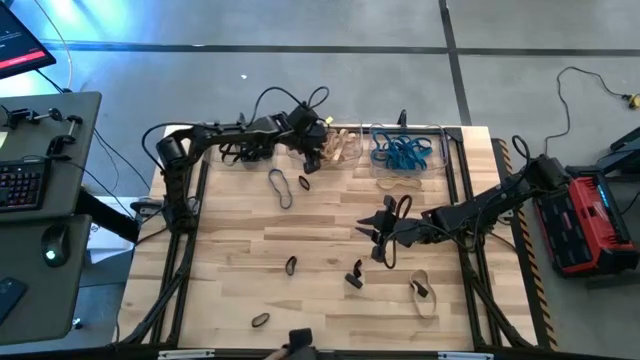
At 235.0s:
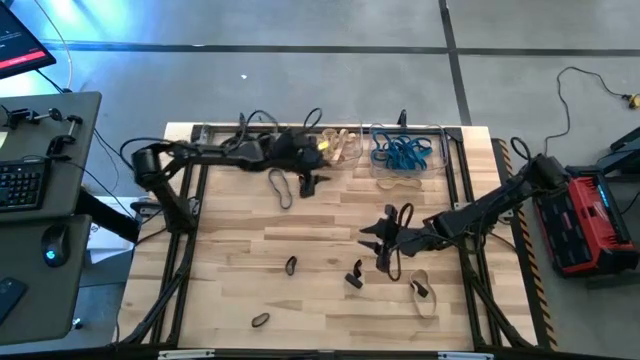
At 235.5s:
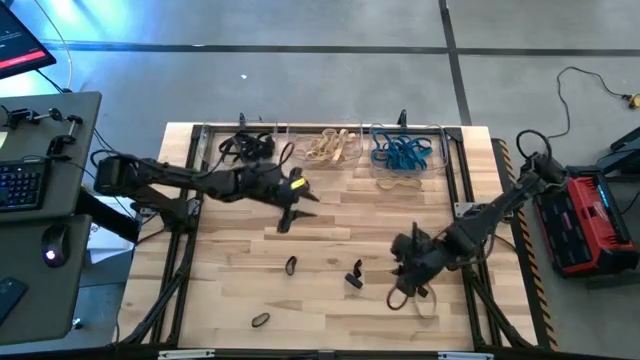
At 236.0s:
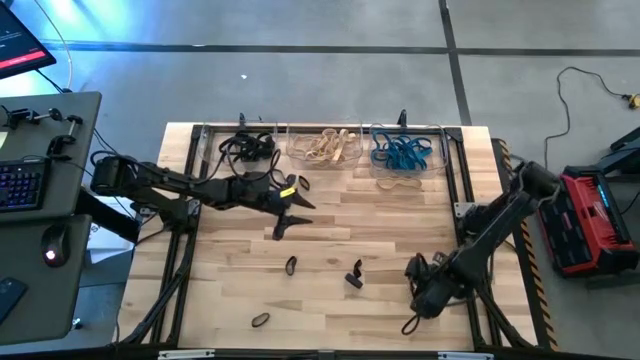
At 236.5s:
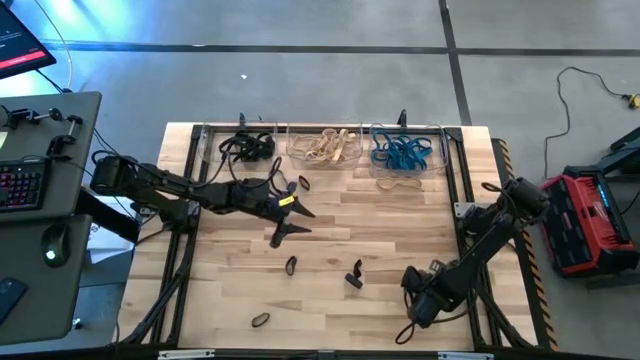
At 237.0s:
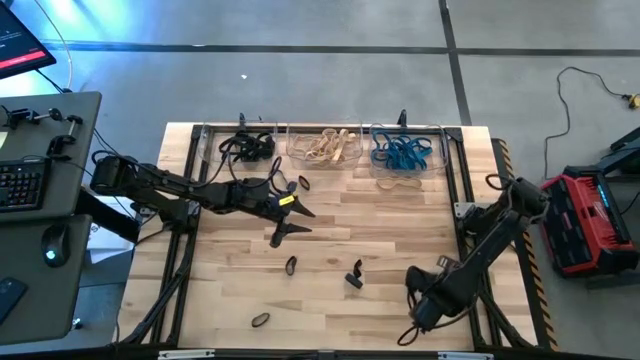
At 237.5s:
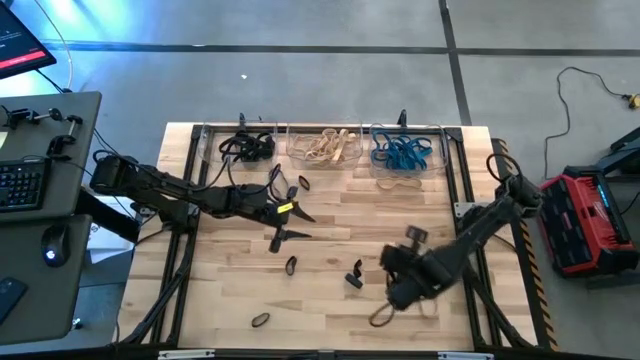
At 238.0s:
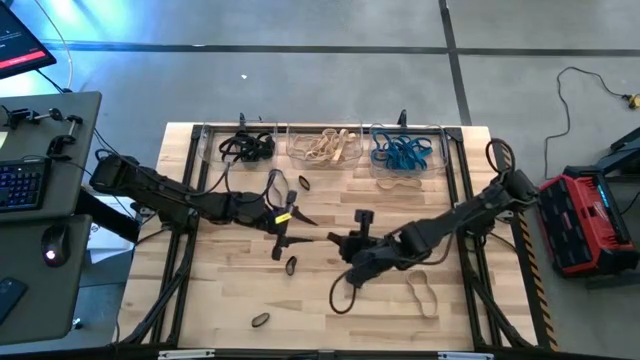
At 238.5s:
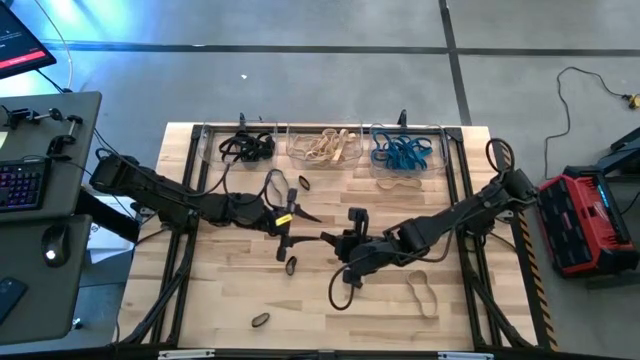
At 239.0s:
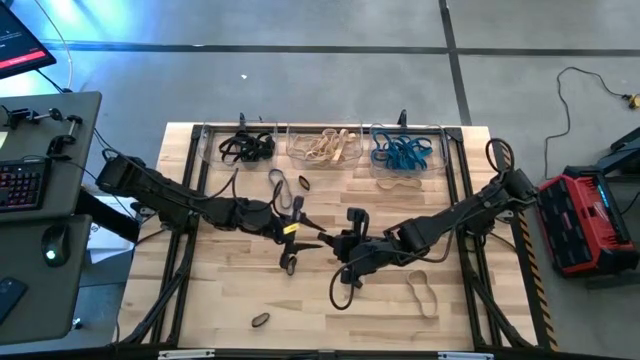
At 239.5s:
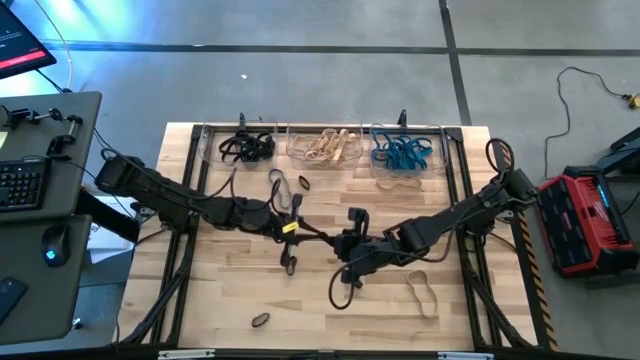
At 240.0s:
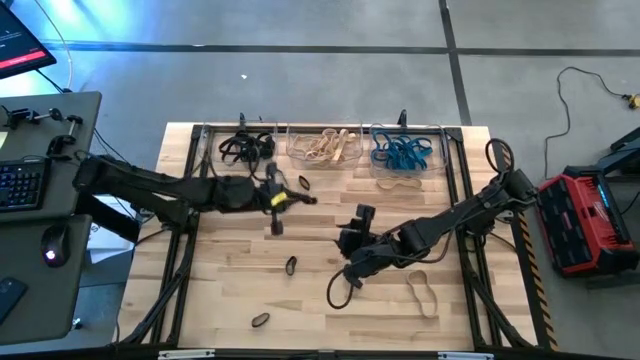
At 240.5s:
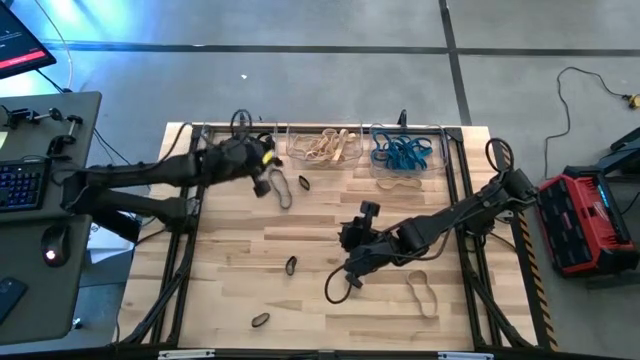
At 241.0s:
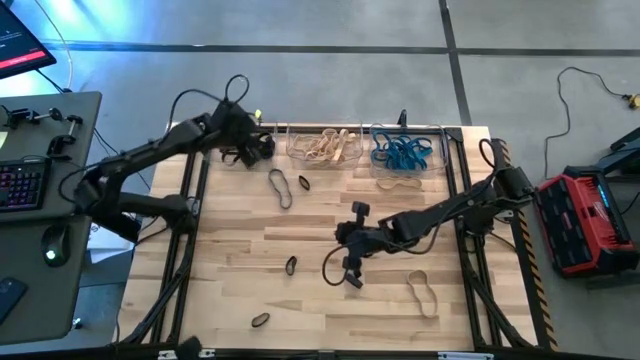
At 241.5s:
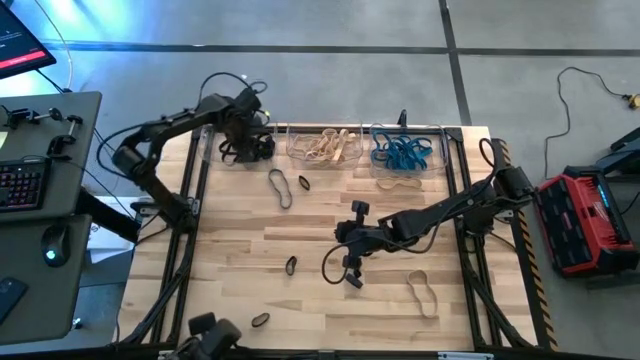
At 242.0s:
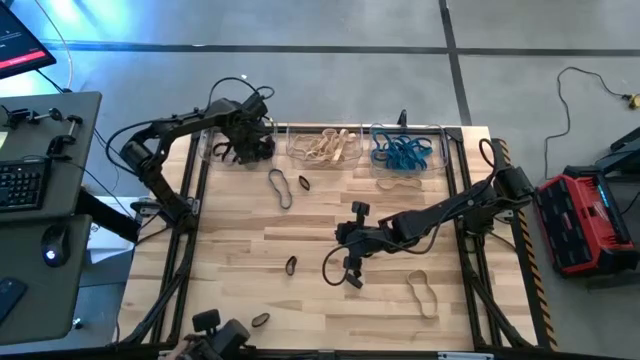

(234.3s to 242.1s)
Task: Sort rubber bands into baskets
Put the black rubber band into the left transparent bin

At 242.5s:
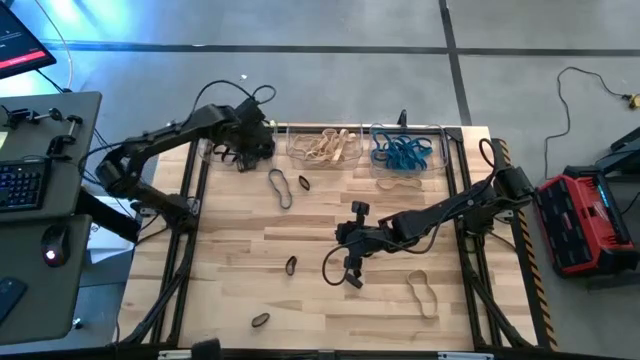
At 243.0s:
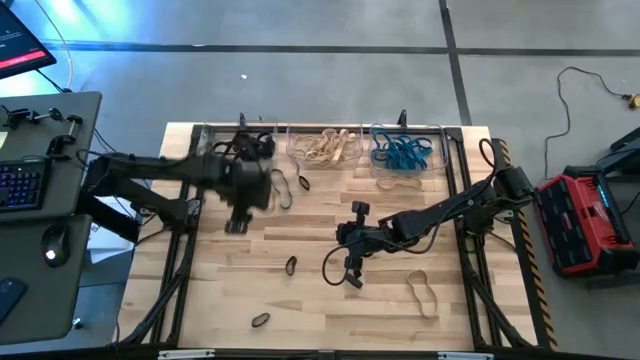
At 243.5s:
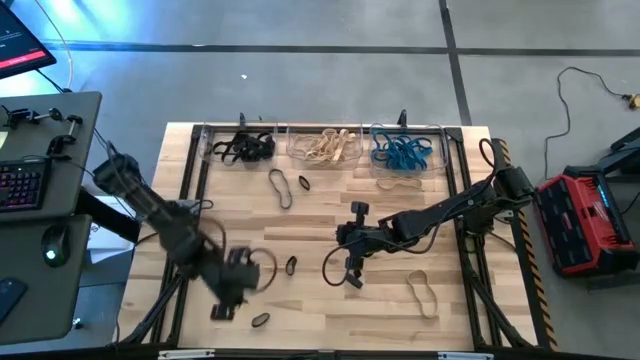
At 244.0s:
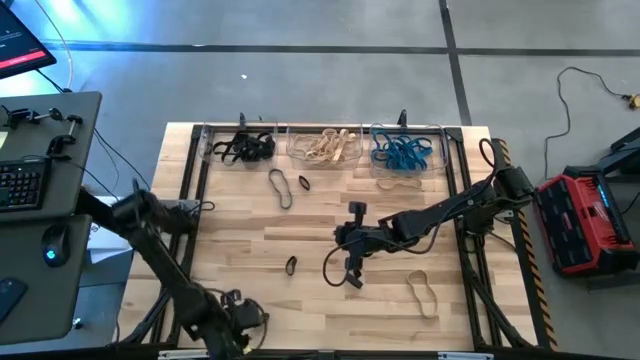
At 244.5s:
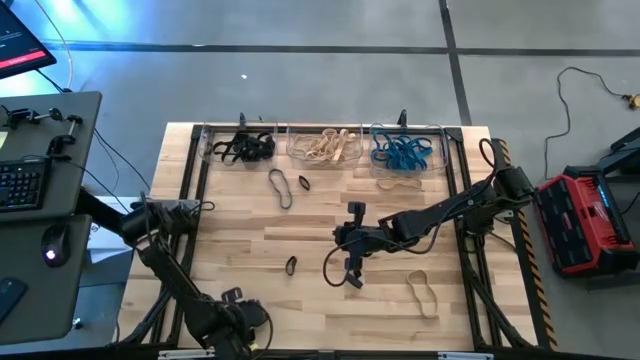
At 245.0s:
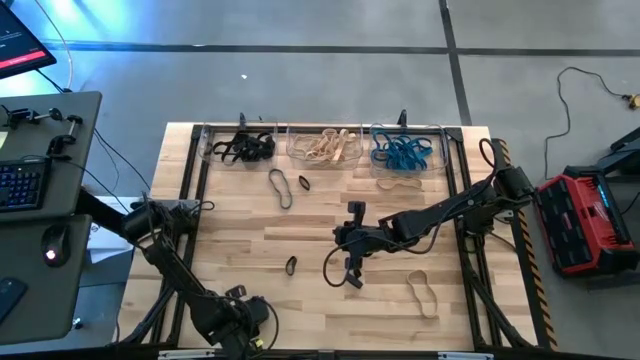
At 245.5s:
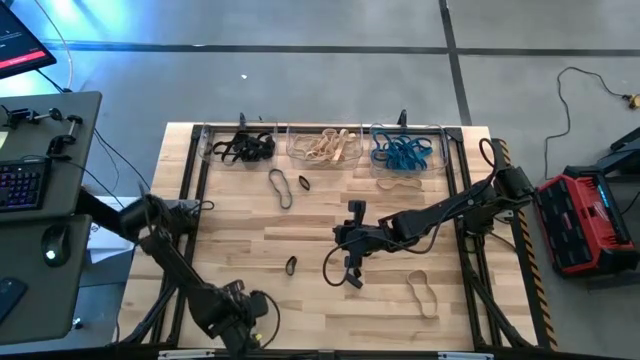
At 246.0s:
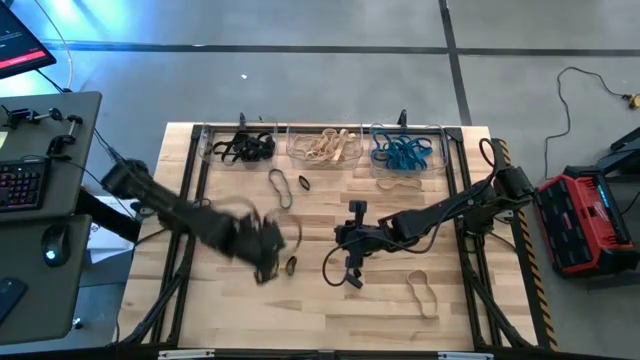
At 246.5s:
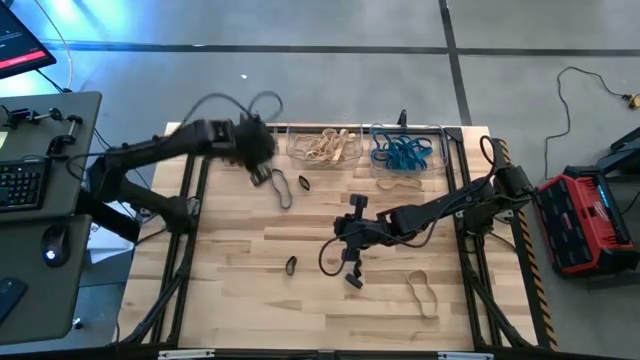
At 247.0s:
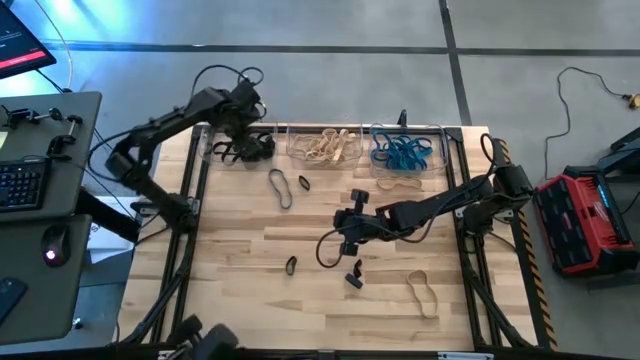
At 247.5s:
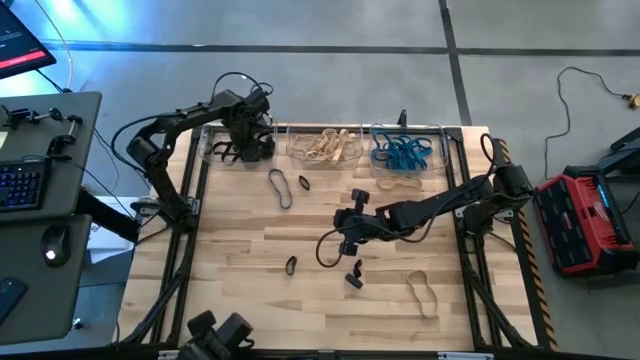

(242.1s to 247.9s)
Put the black rubber band into the left transparent bin

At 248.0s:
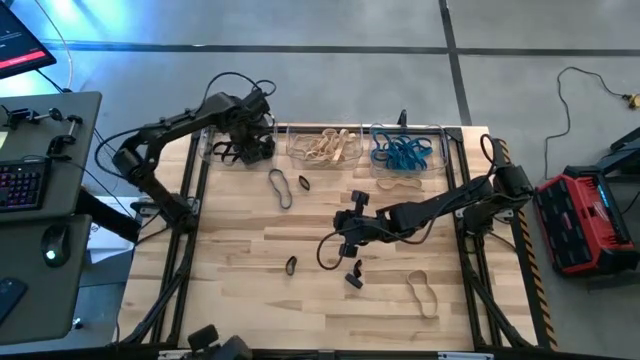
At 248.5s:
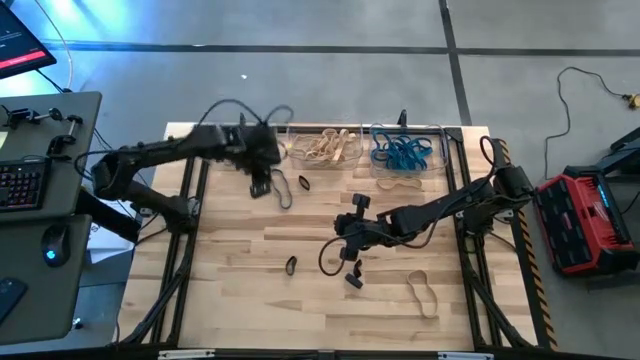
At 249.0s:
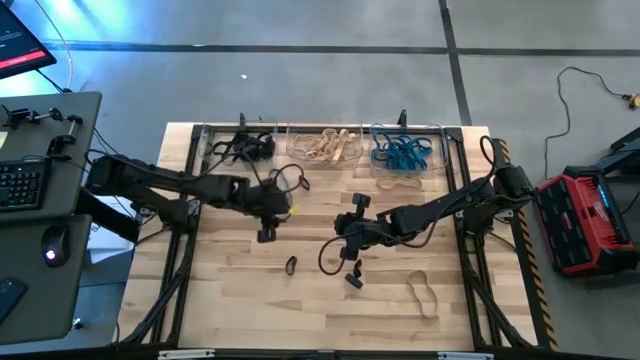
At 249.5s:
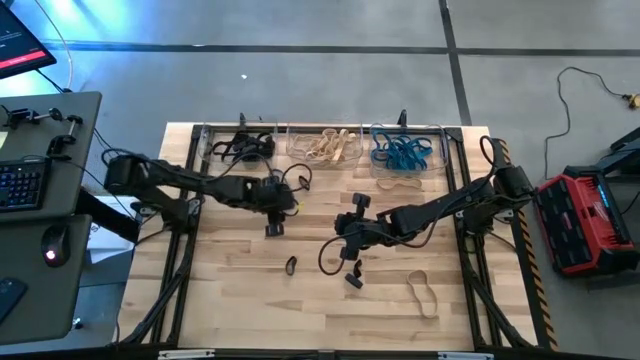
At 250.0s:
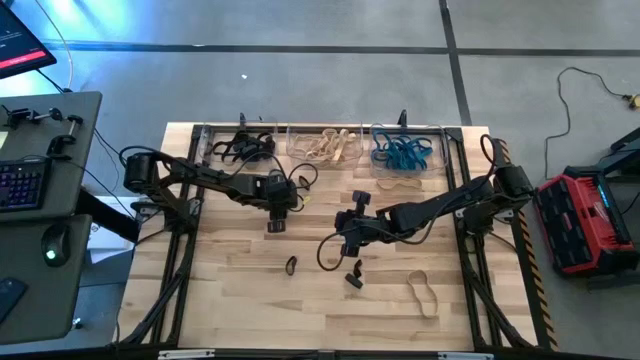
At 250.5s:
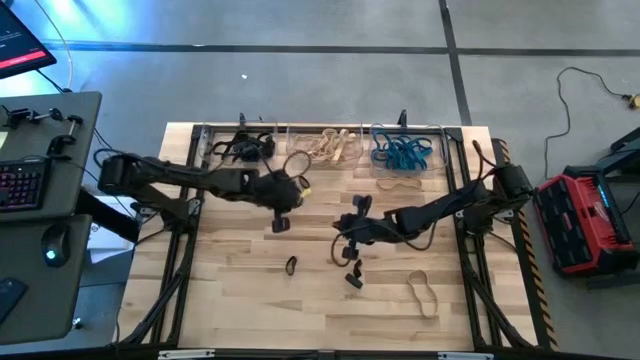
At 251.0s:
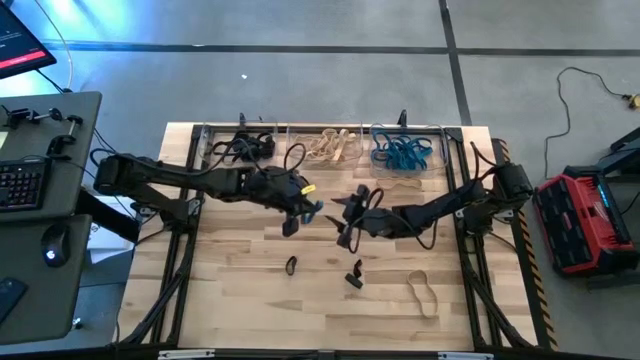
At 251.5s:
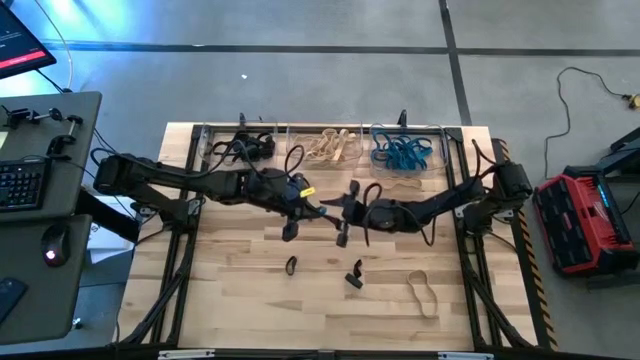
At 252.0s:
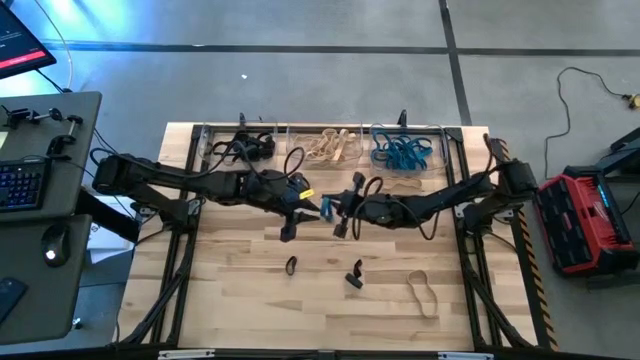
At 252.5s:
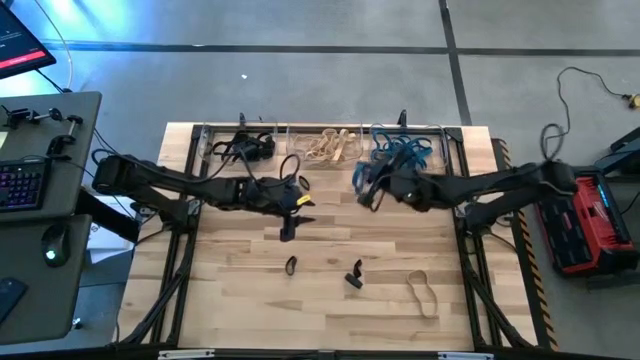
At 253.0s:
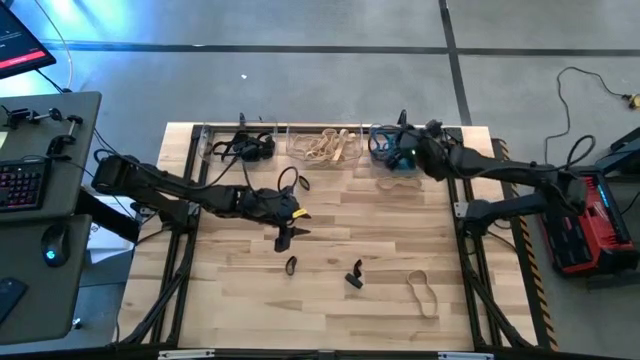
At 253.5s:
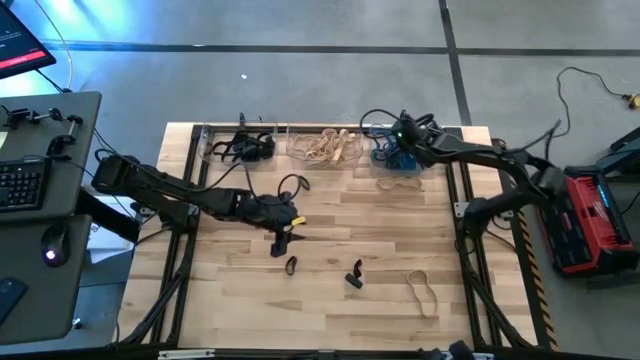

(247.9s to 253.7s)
Put the blue rubber band into the right transparent bin

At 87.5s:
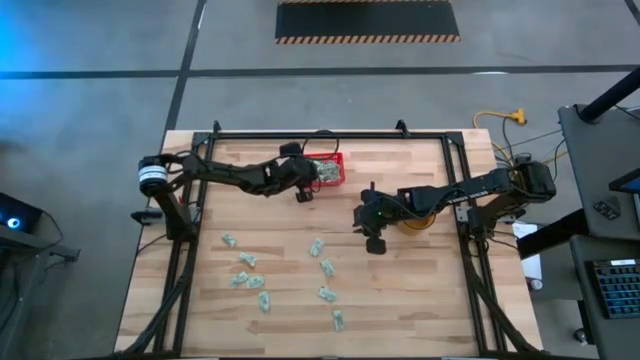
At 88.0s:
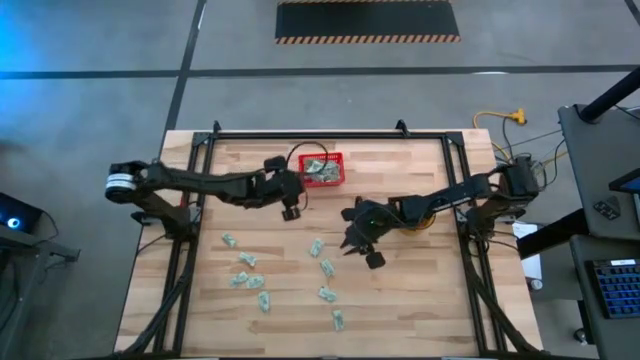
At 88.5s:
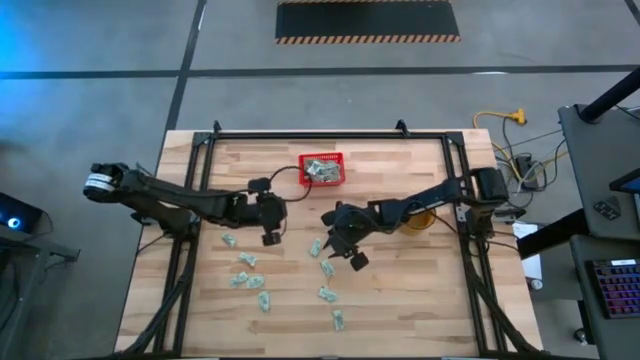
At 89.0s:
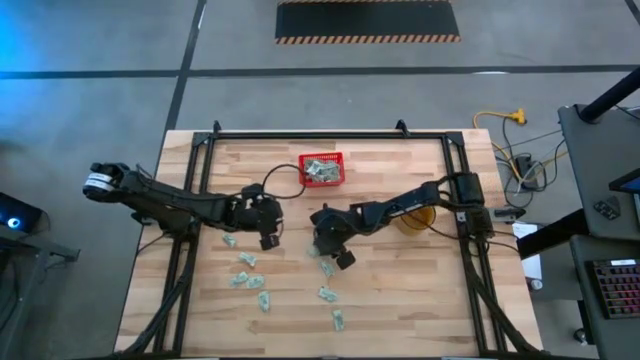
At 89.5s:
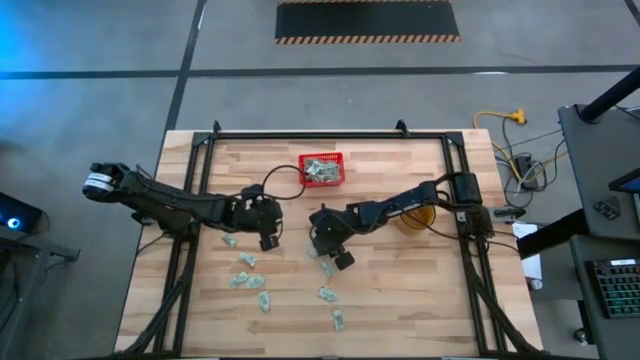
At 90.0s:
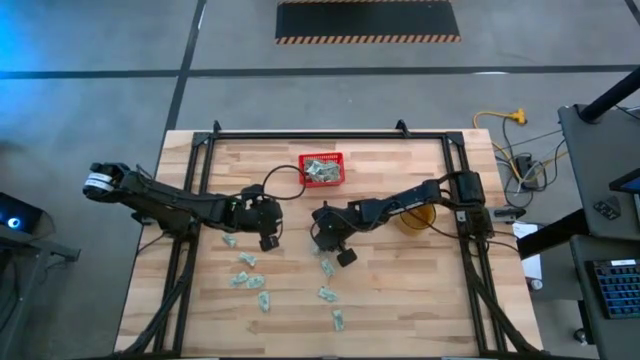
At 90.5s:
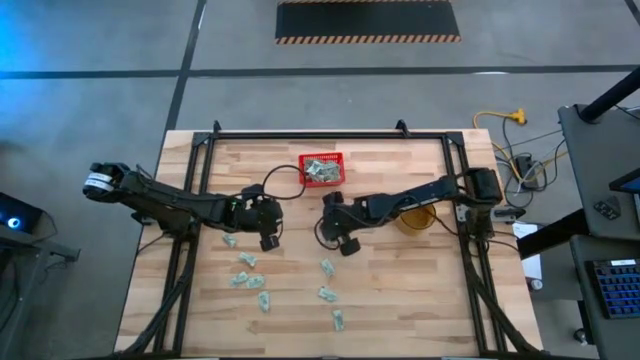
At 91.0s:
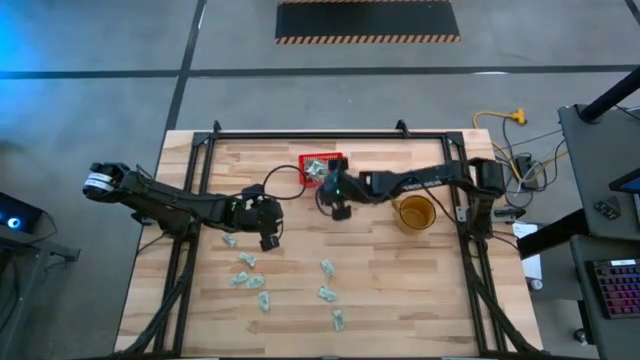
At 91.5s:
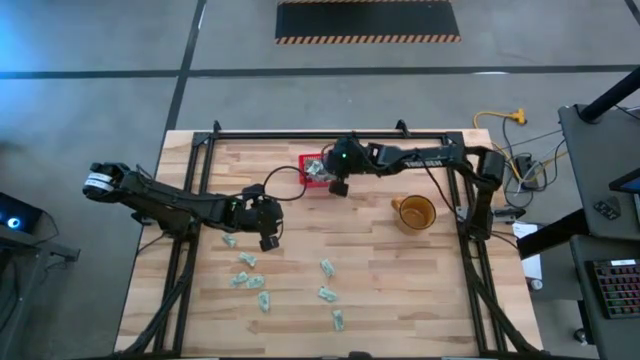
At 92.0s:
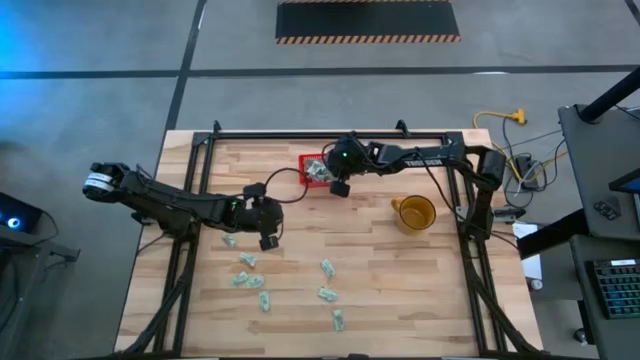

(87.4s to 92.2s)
Task: Pick and place Stevia / Truvia into bins
Put the white stevia packet into the red bin
